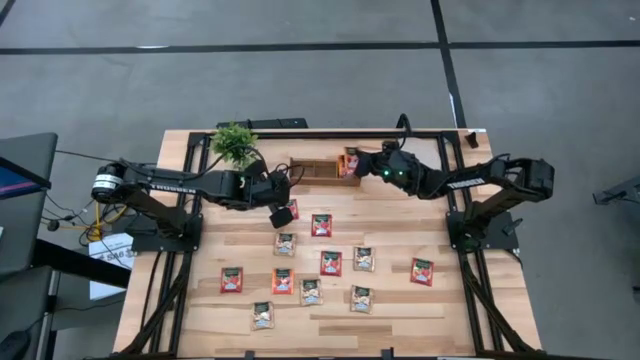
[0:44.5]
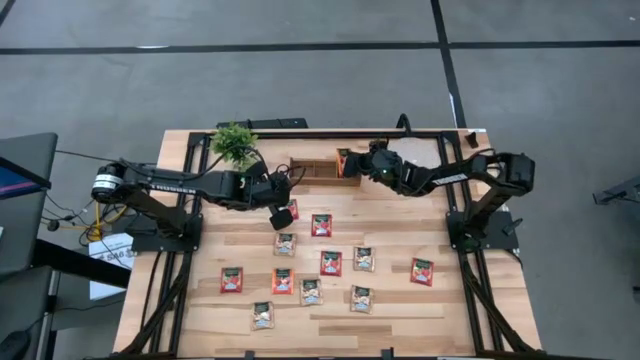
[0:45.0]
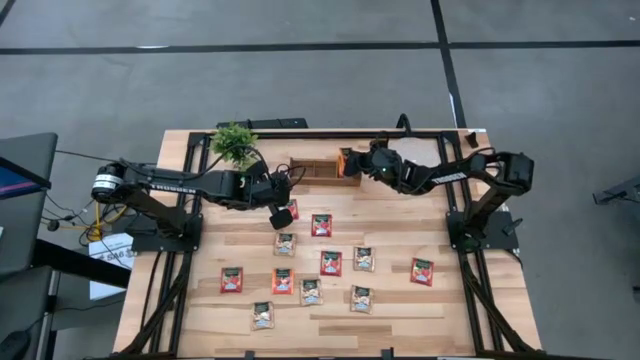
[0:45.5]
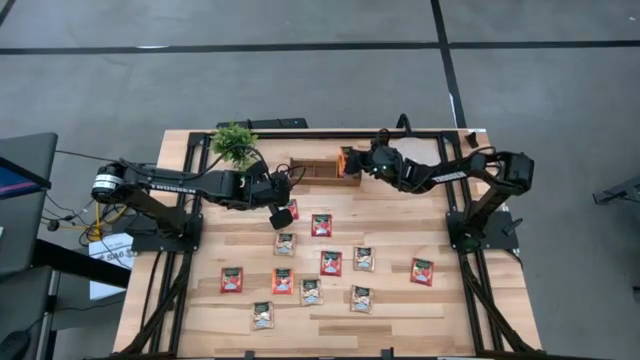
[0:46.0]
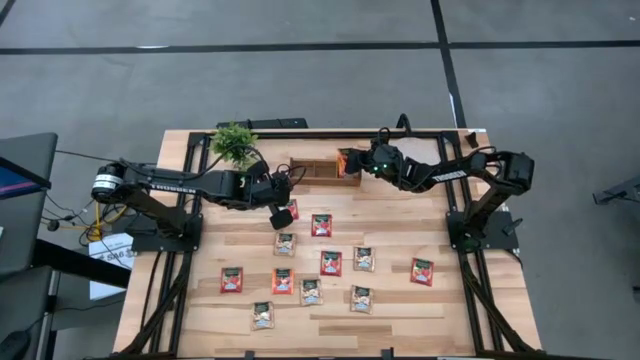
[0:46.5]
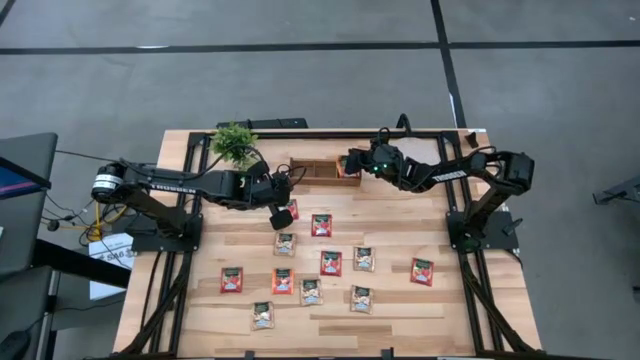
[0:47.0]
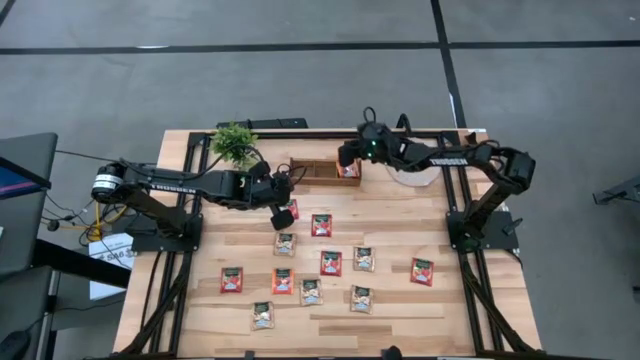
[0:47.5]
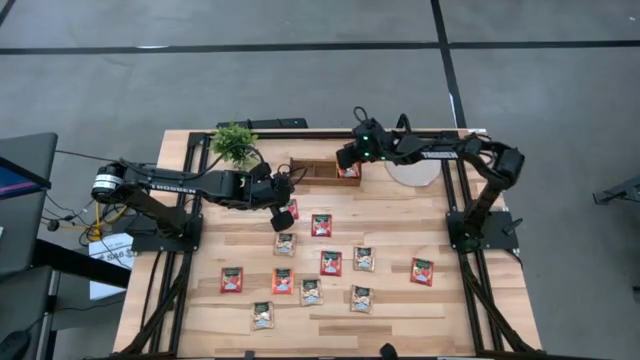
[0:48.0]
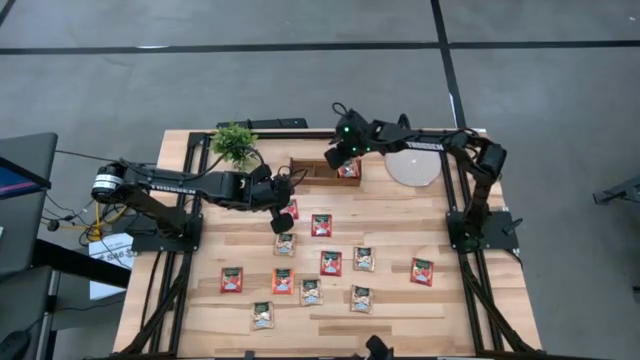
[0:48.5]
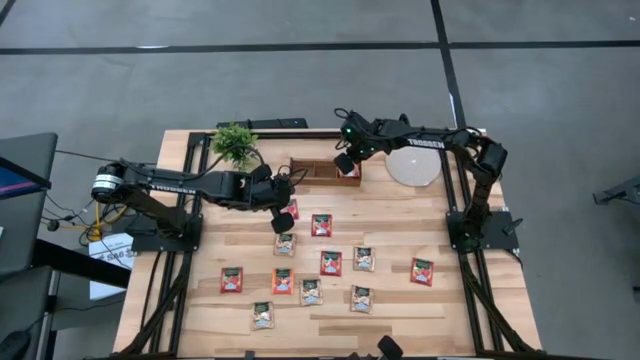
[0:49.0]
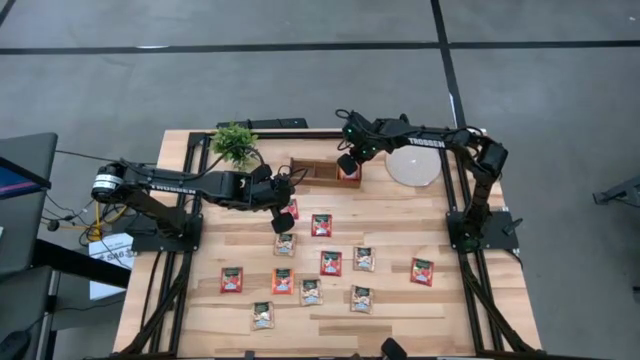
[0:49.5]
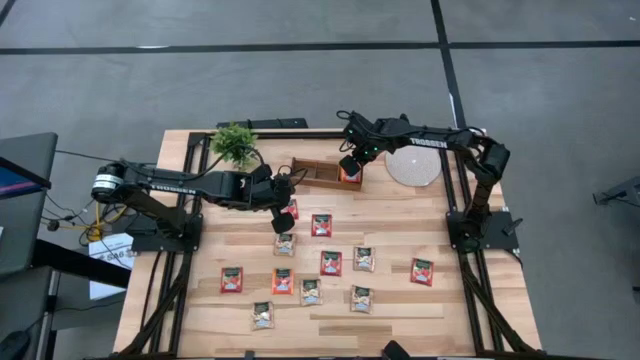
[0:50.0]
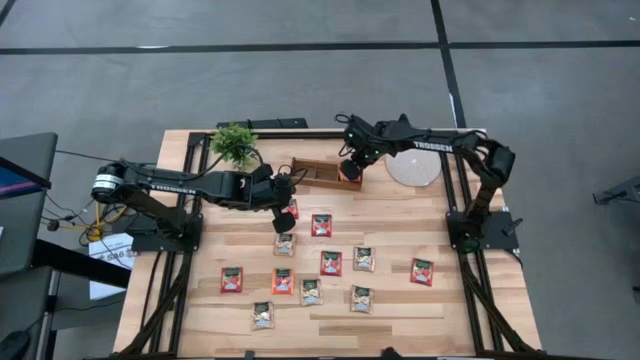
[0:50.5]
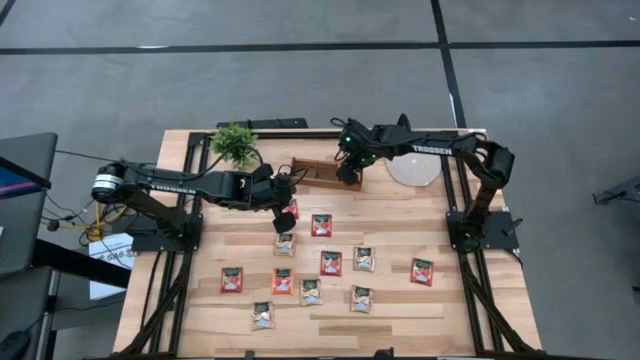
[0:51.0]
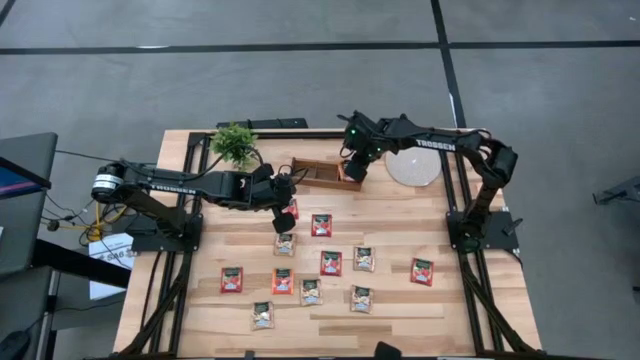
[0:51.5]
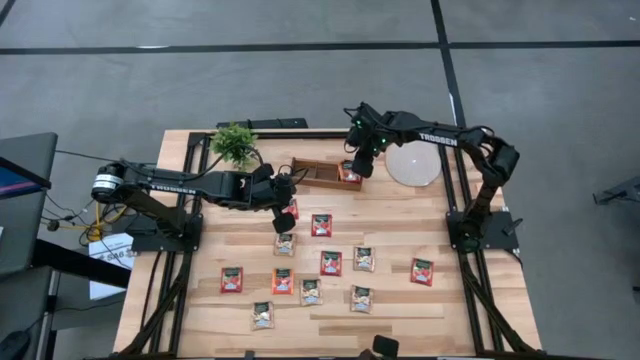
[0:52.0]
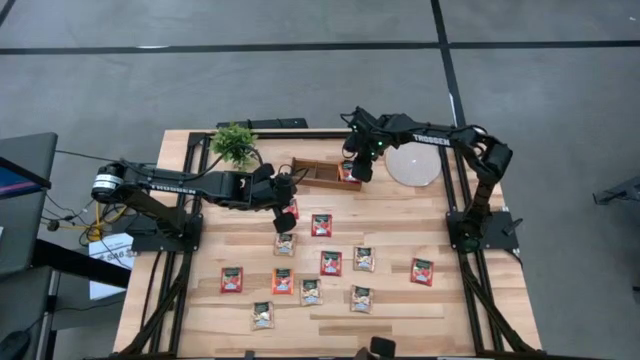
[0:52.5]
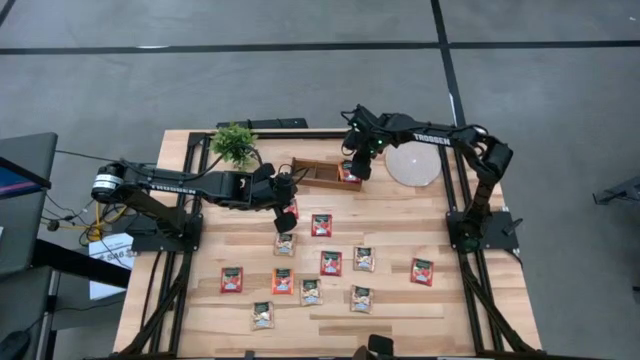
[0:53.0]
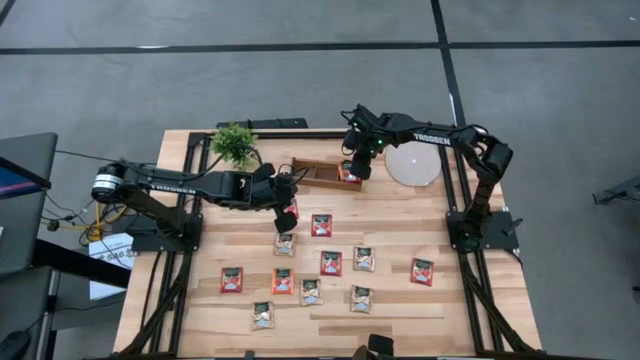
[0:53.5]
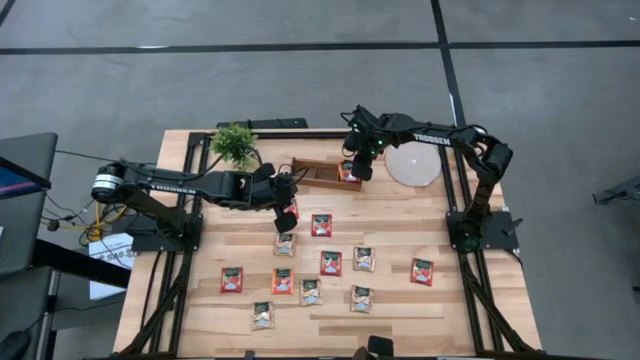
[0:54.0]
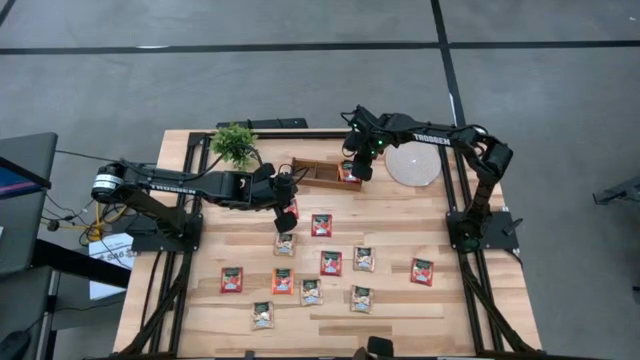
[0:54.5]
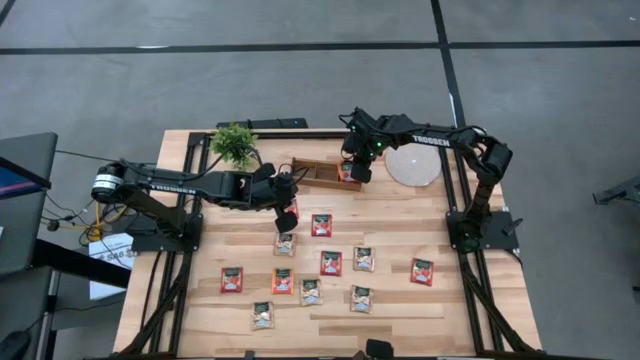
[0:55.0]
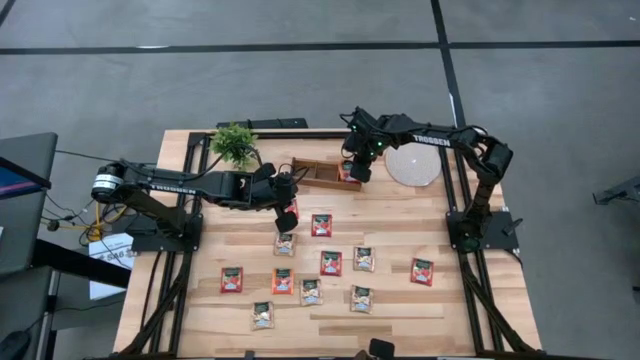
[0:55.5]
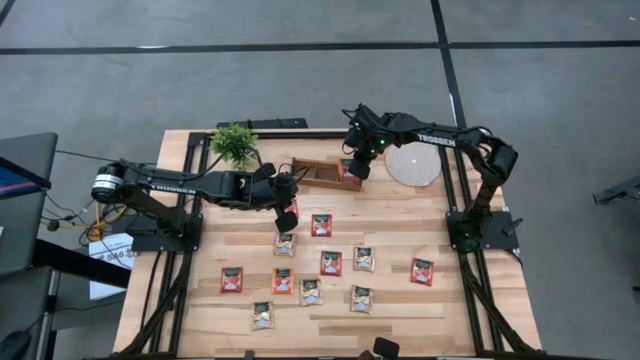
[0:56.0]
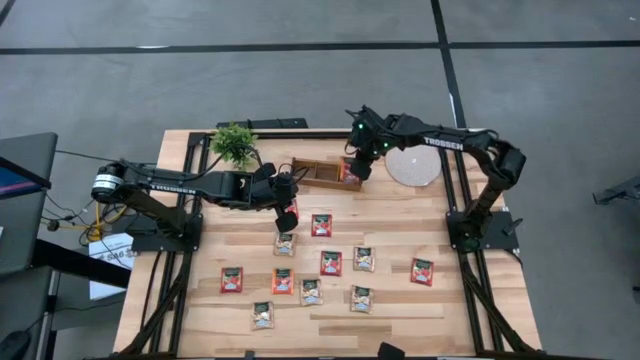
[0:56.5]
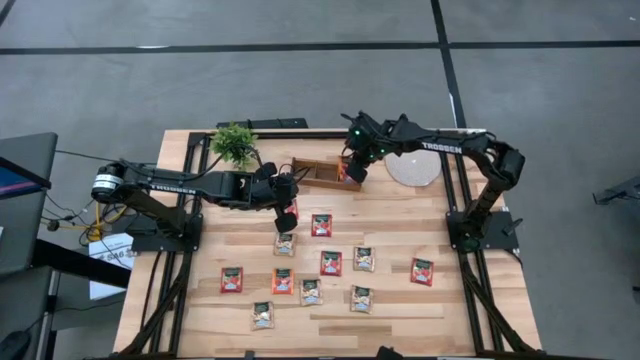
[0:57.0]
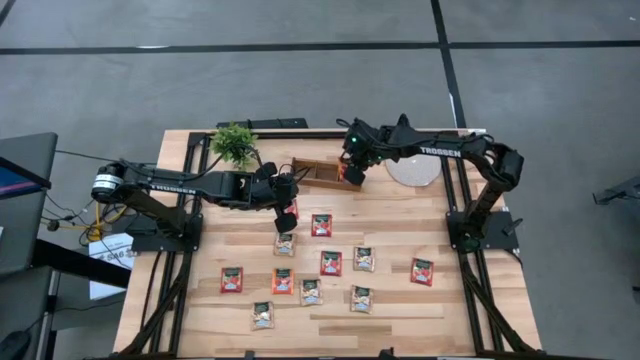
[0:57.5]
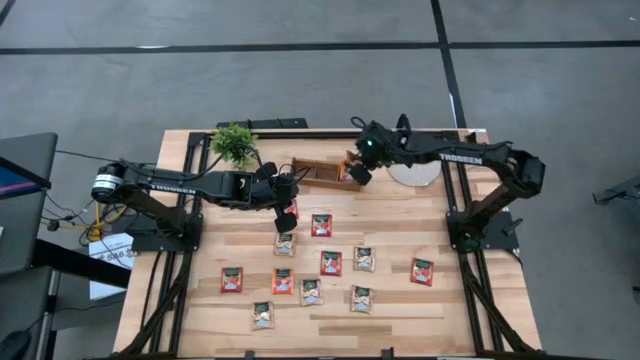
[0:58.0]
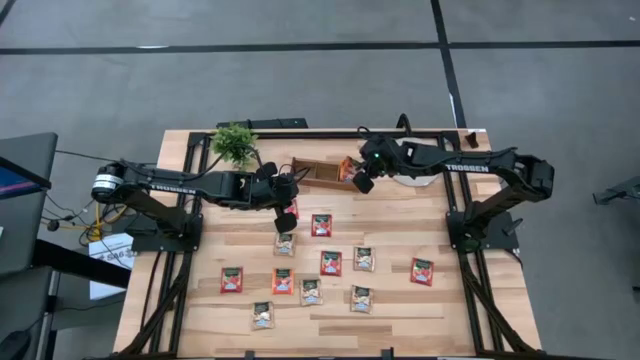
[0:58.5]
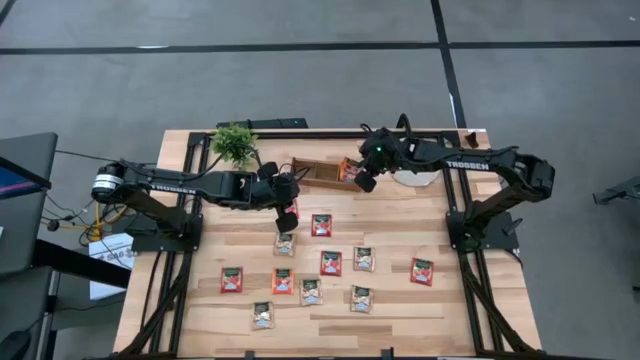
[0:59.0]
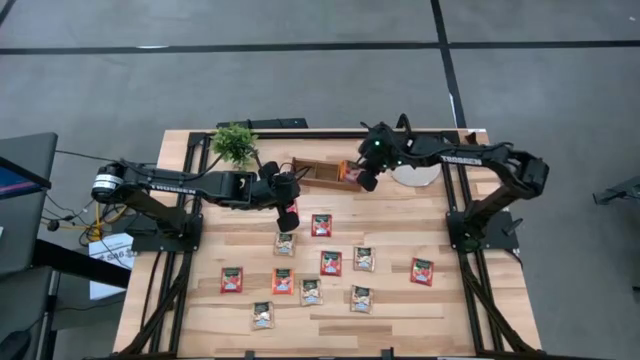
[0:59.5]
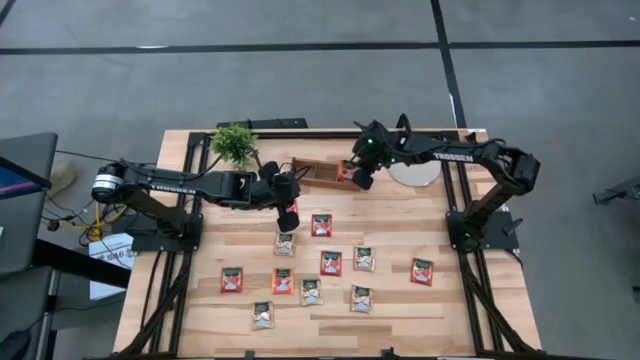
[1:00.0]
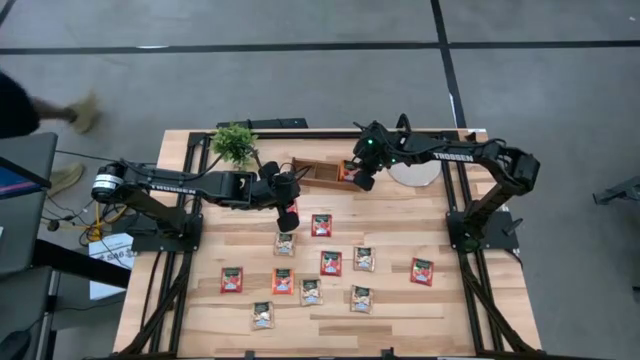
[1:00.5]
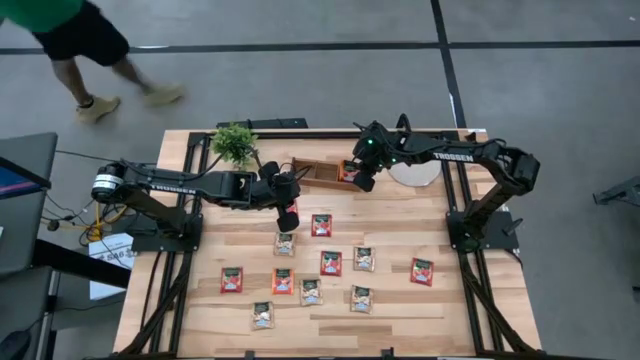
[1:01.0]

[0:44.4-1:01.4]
Task: Pick & Place Tea
Put the orange tea bag into the right section of the wooden organizer

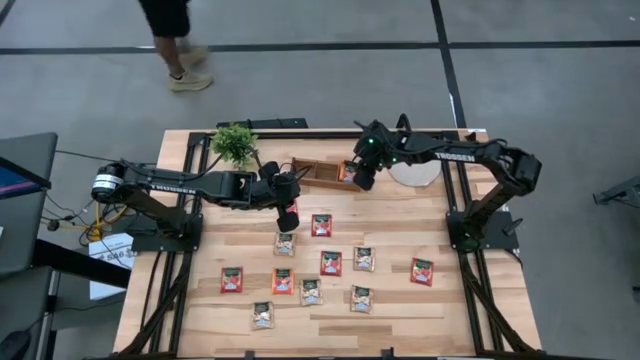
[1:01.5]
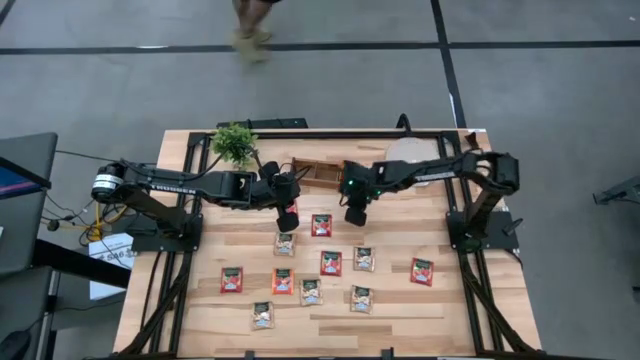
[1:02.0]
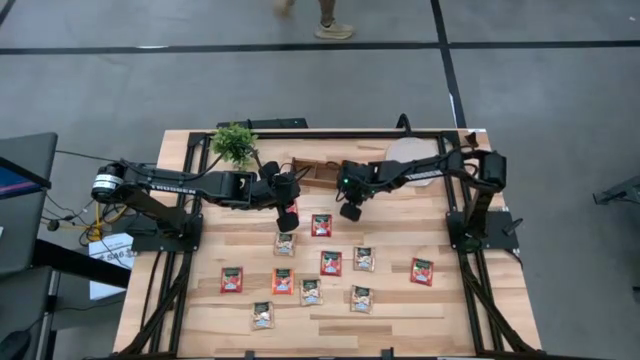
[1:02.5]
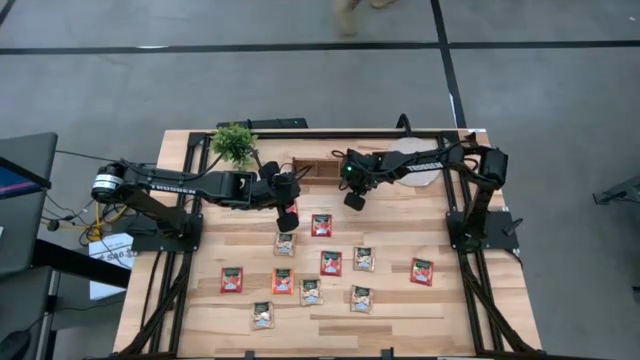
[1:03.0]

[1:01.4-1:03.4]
Adjust the wooden organizer

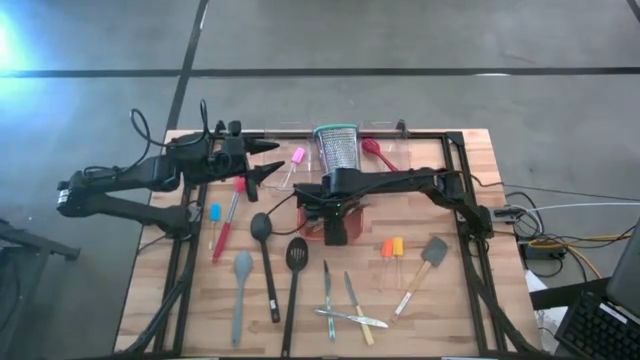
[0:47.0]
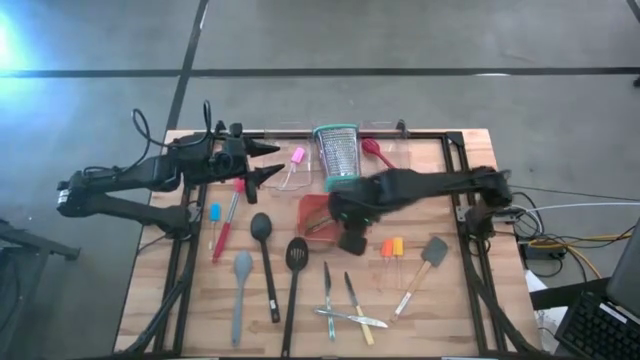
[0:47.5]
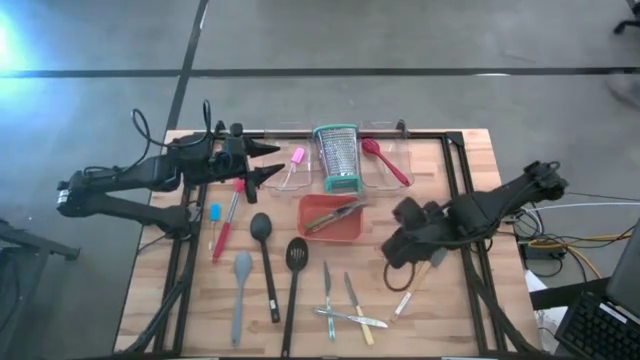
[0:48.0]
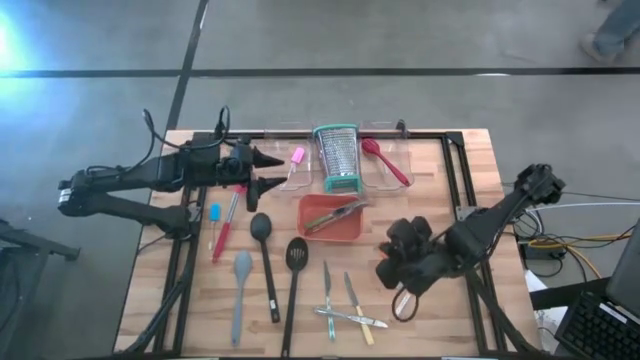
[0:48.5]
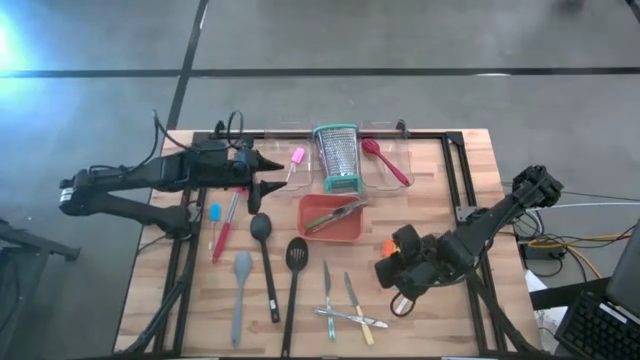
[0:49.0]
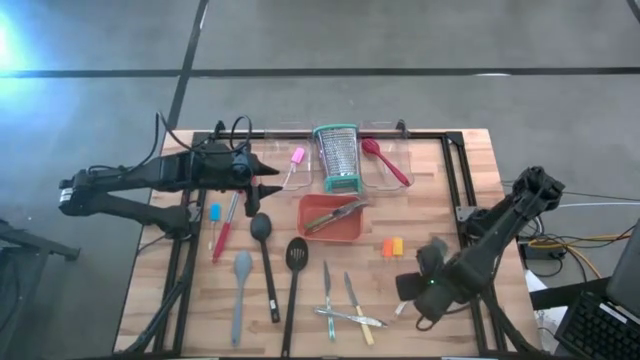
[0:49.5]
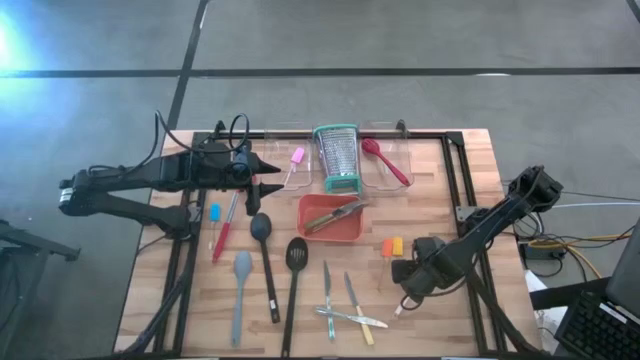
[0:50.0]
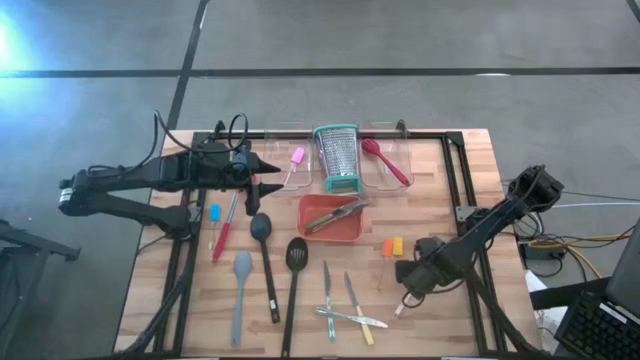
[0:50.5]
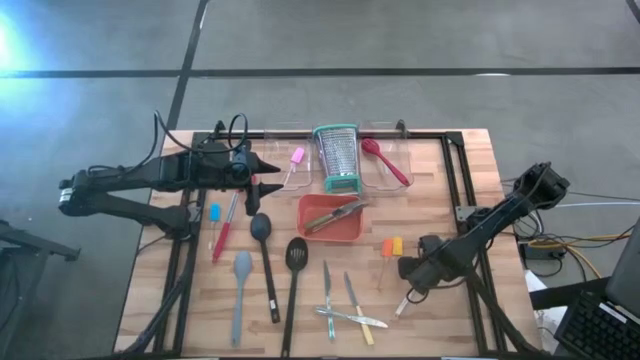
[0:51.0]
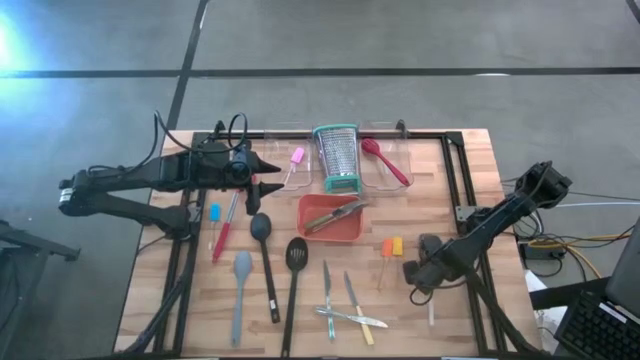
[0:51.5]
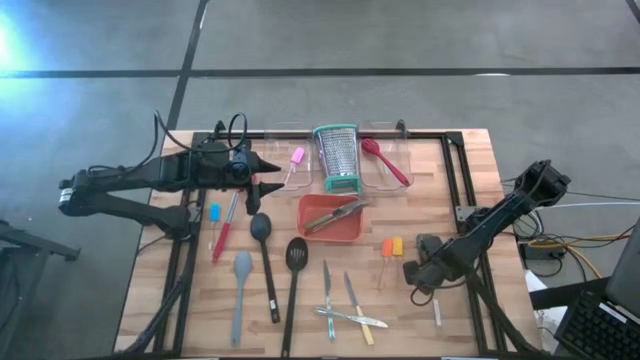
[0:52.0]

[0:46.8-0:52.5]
Task: Pick & Place Kitchen Items
Put the gray spatula into the left transparent bin
